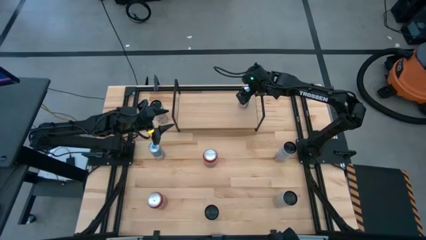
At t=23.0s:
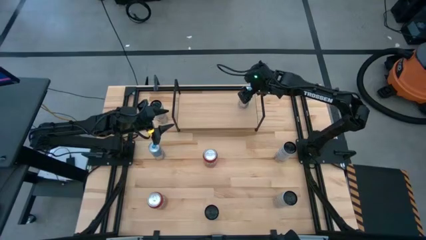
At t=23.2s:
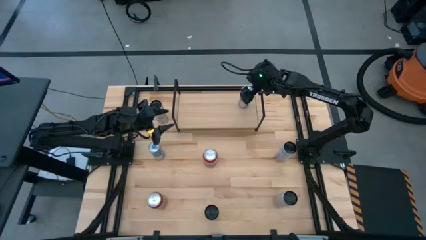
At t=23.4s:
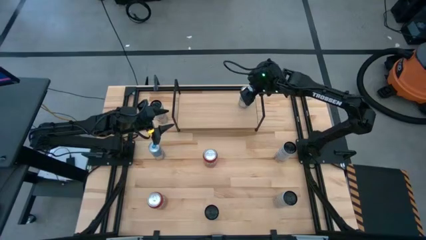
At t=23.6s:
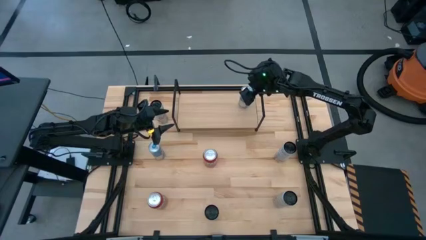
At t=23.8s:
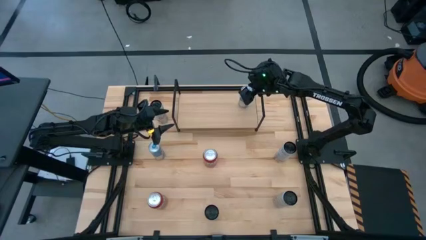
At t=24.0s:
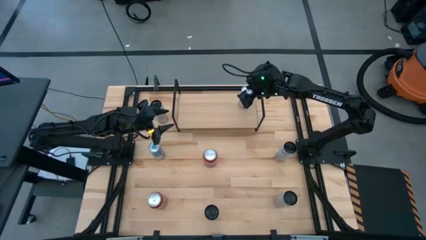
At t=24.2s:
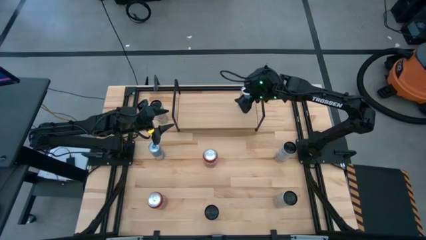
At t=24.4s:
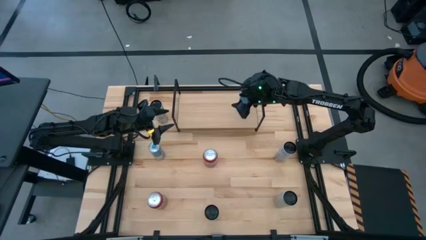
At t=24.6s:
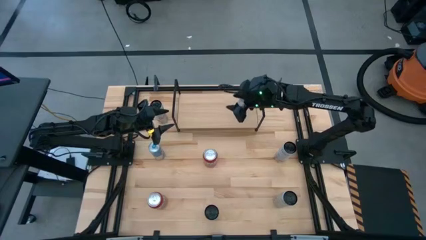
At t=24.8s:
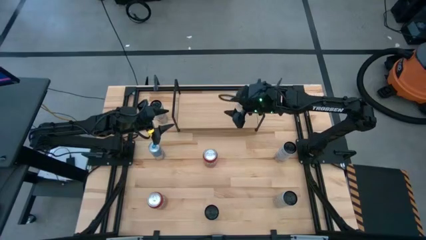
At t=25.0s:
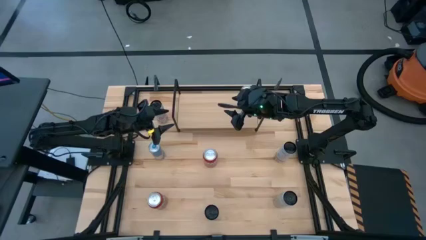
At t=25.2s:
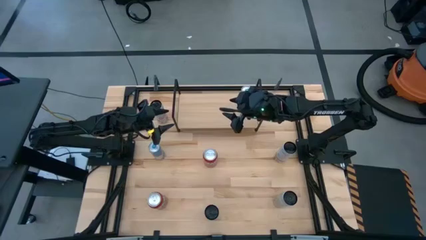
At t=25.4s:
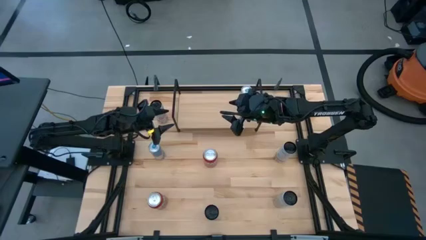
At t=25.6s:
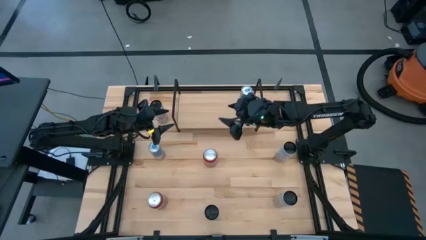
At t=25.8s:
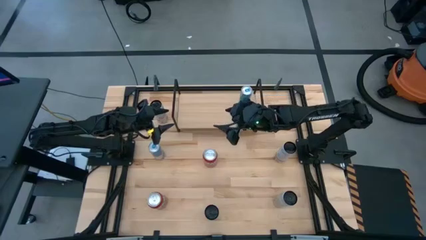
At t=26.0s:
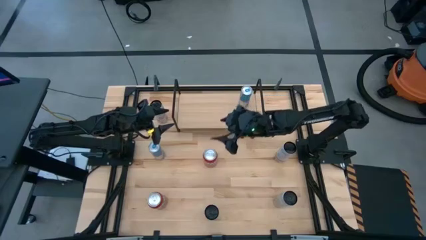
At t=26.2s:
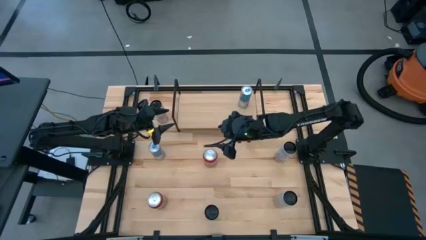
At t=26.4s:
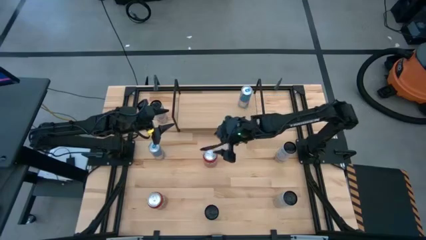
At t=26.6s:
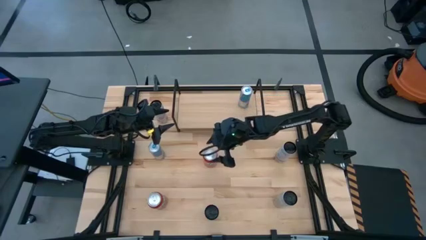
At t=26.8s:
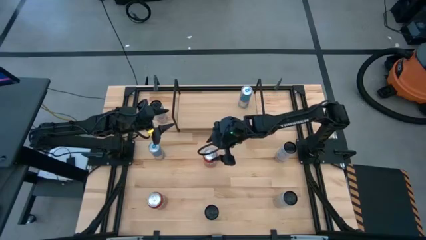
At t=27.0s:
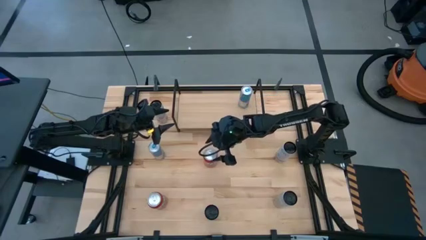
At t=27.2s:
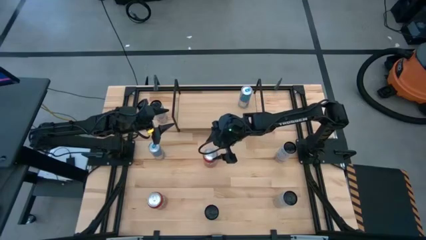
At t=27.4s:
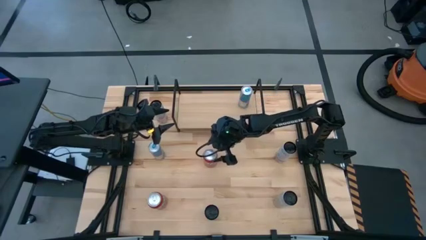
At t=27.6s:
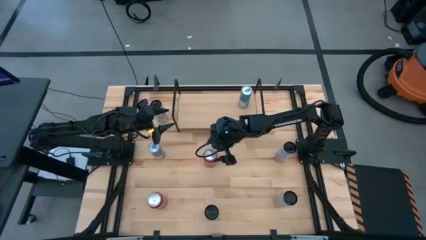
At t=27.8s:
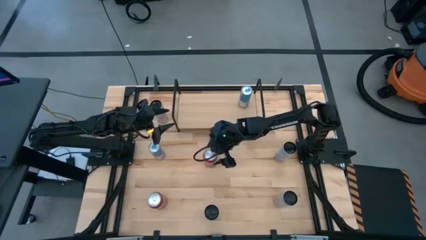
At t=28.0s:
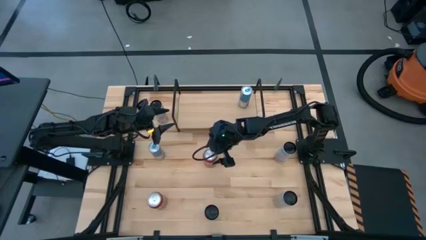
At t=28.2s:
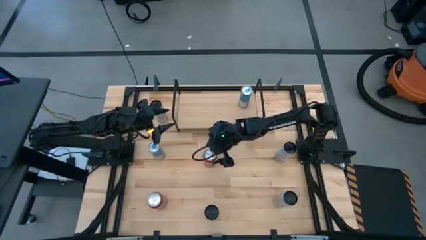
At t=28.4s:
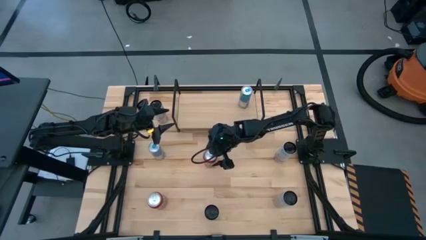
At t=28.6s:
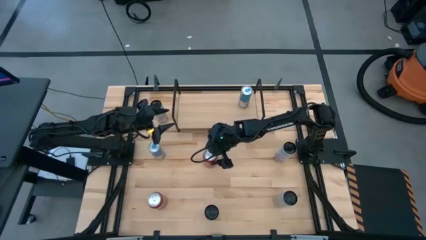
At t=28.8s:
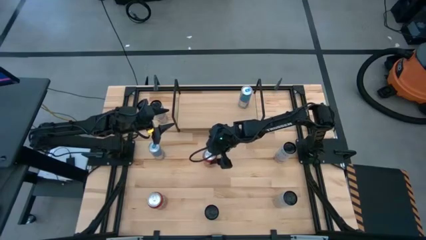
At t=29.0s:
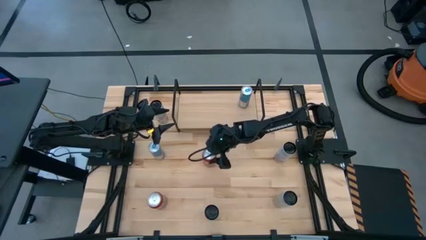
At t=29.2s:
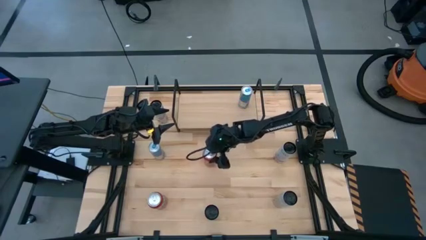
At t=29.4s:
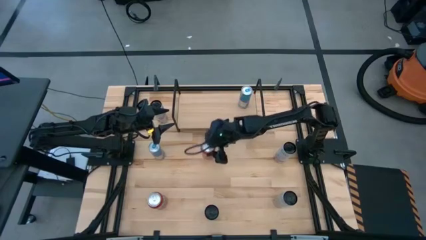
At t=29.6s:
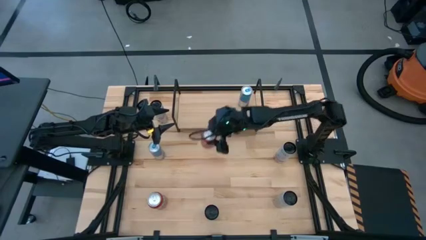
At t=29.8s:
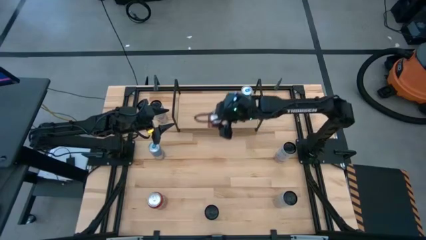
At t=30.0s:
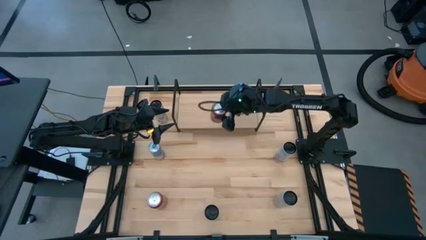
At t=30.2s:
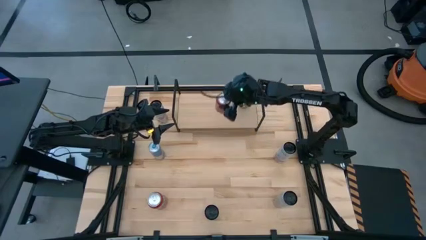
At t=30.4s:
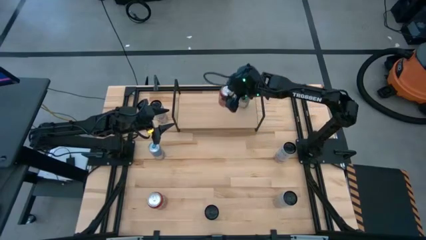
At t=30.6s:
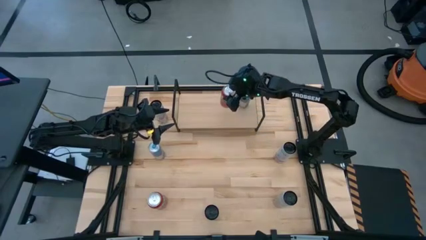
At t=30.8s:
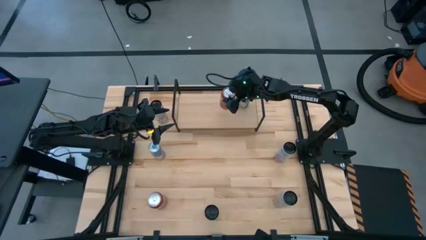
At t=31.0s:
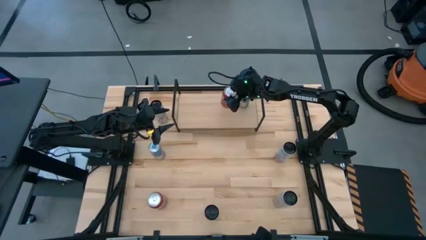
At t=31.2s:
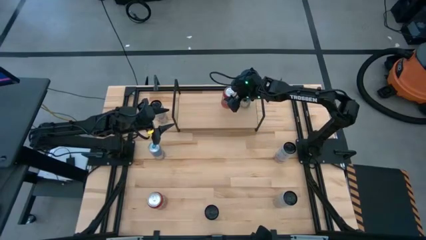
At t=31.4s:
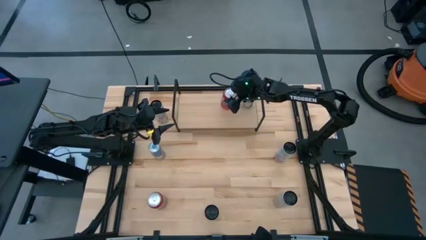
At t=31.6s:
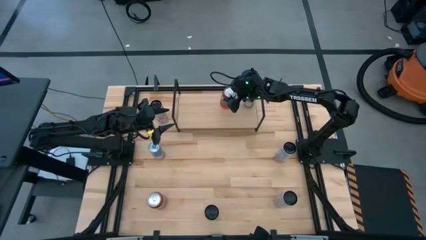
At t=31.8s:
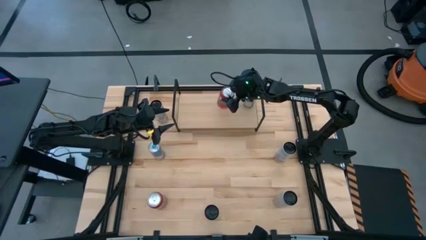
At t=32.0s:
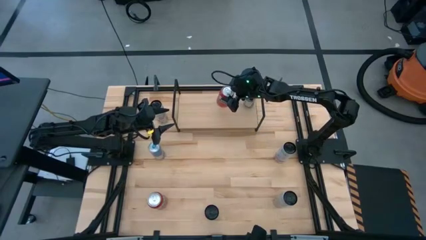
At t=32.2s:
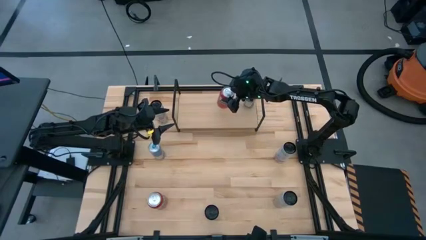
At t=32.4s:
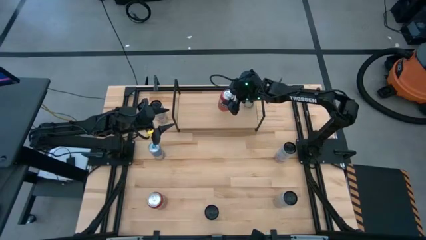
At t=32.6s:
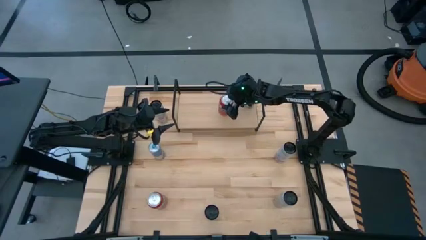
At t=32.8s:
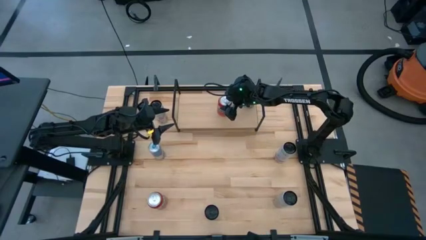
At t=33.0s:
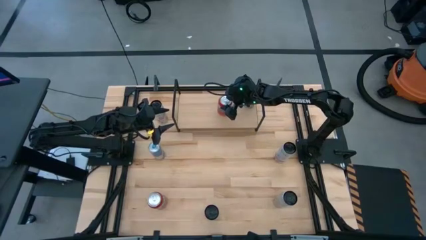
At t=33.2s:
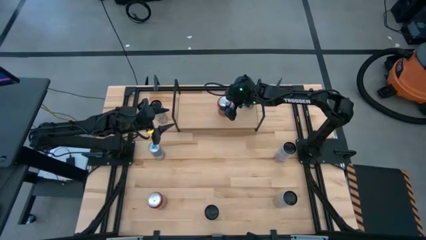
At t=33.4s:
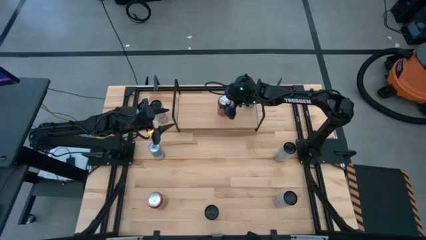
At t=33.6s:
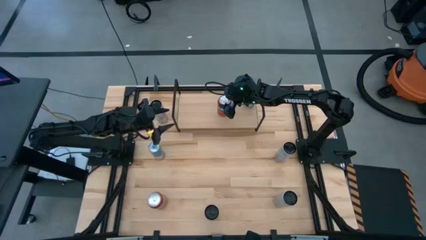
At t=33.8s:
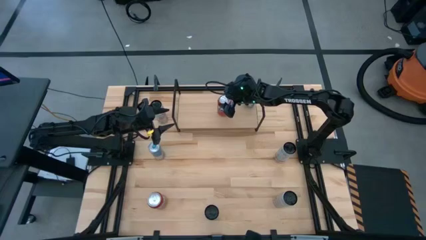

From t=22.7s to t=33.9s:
Task: Place canned beverage on shelf
Put the top orange soda can on the shelf
